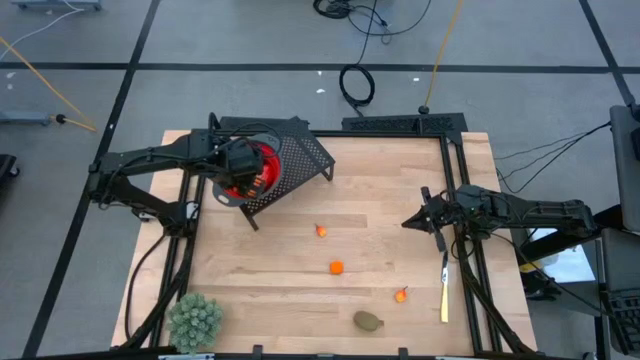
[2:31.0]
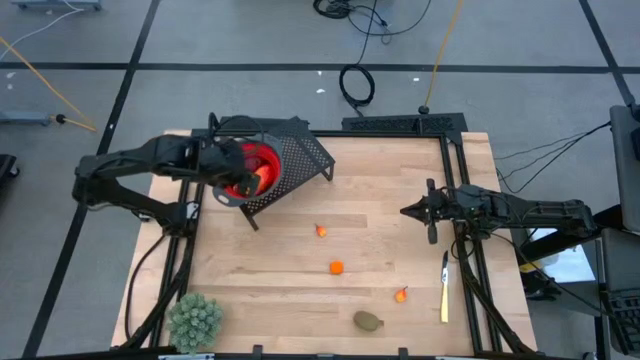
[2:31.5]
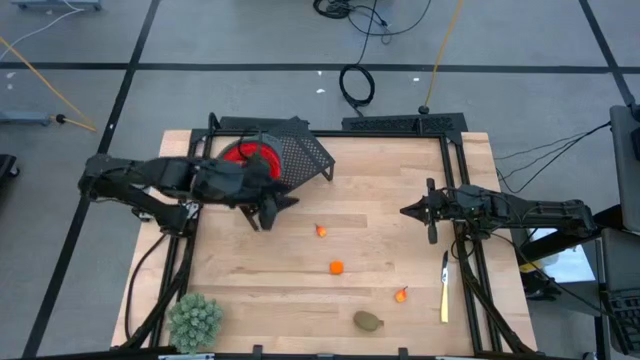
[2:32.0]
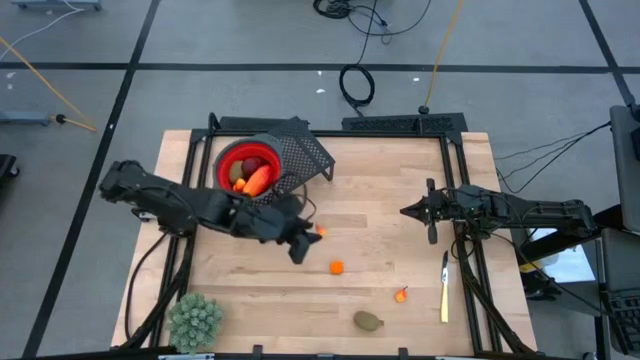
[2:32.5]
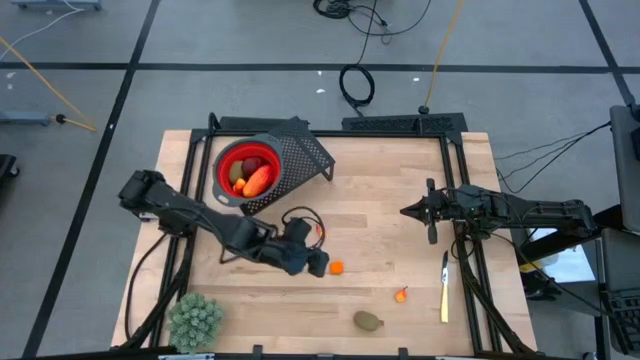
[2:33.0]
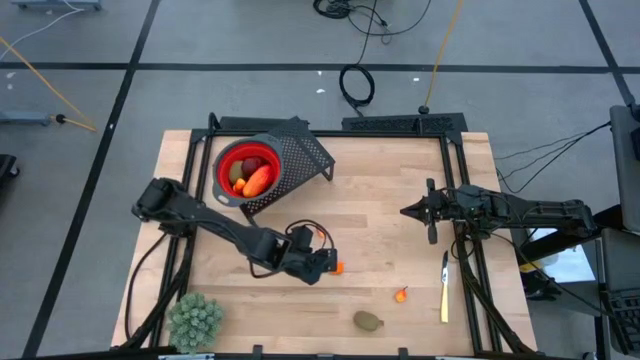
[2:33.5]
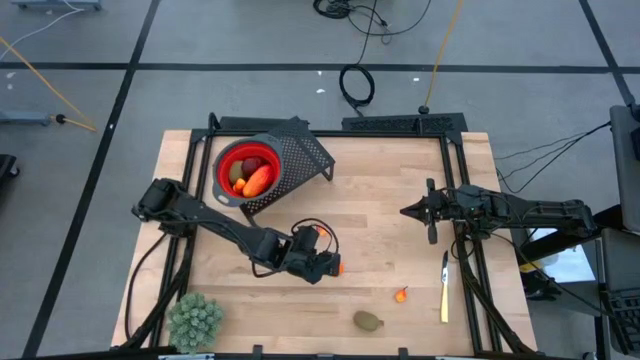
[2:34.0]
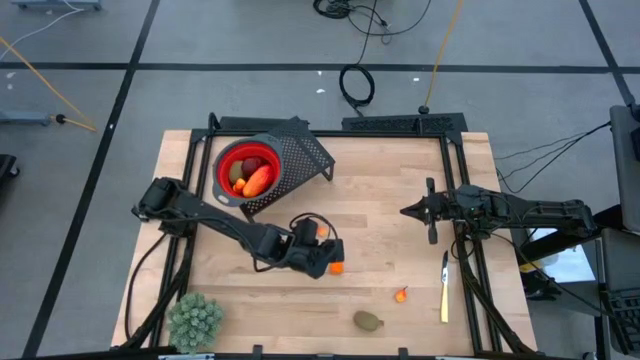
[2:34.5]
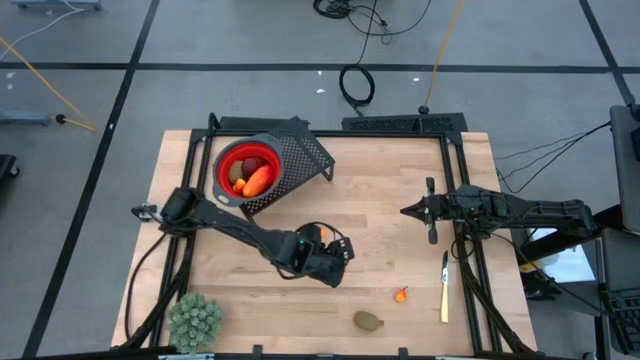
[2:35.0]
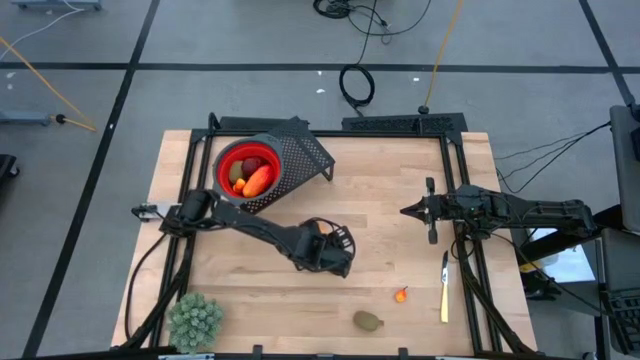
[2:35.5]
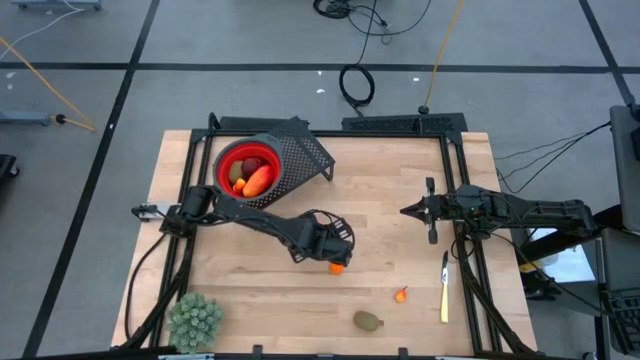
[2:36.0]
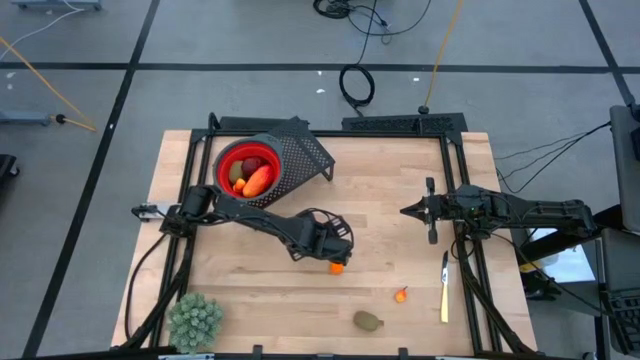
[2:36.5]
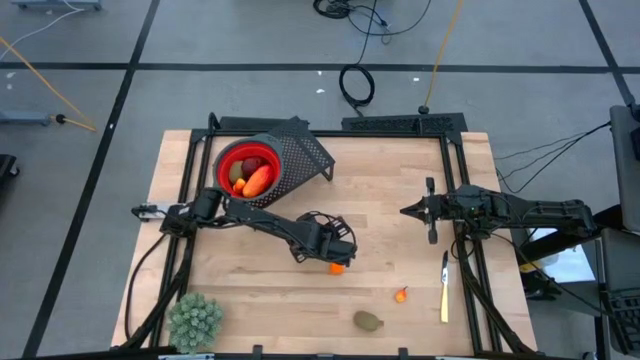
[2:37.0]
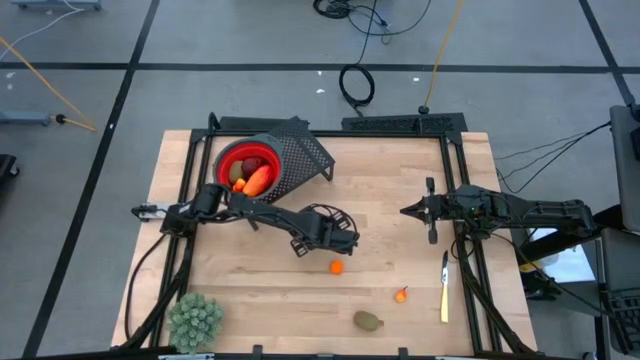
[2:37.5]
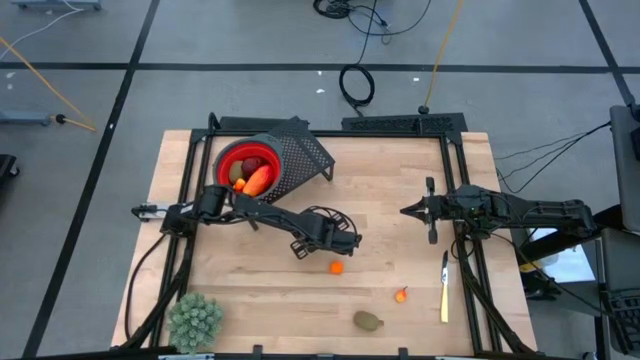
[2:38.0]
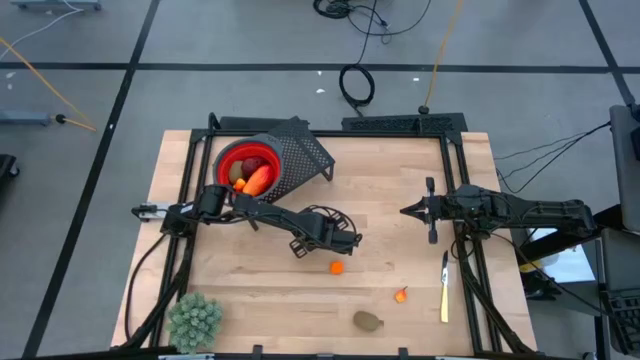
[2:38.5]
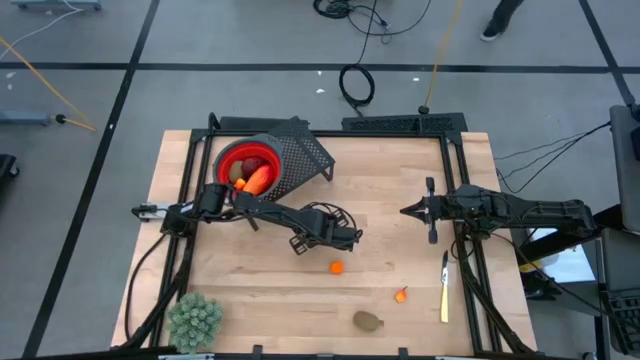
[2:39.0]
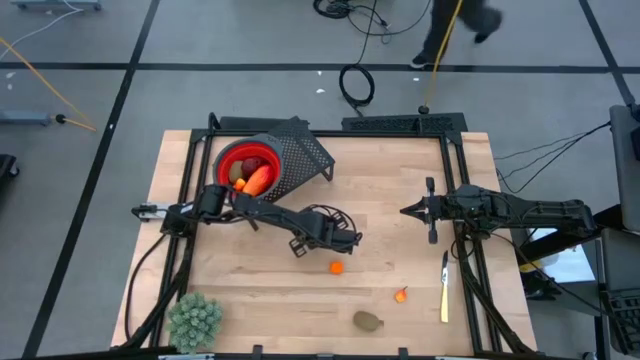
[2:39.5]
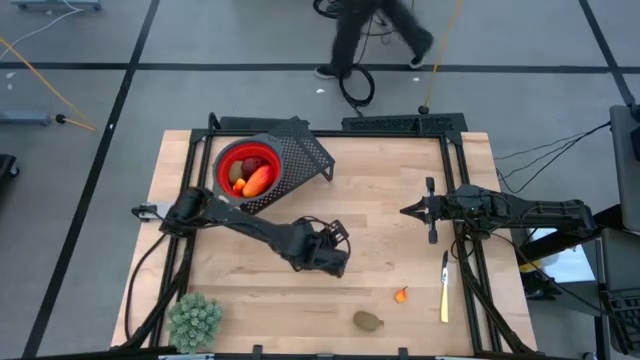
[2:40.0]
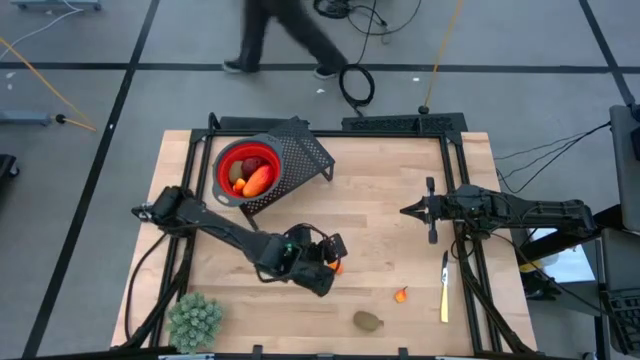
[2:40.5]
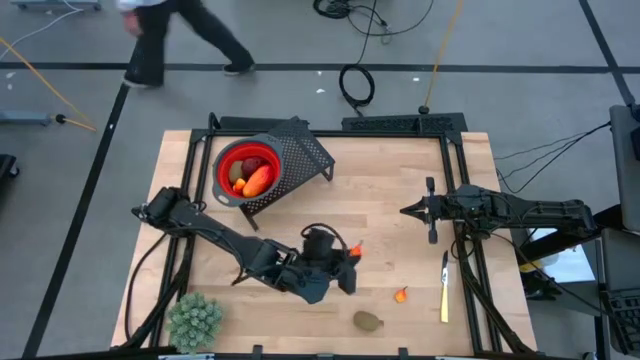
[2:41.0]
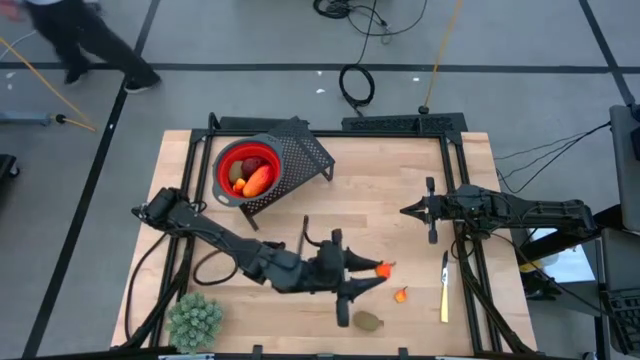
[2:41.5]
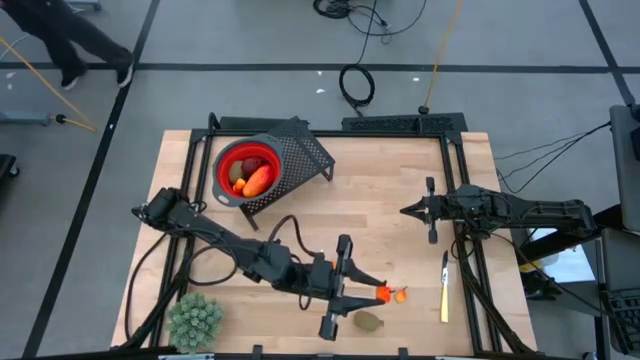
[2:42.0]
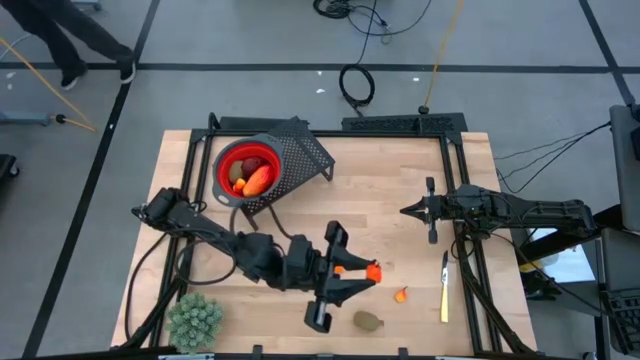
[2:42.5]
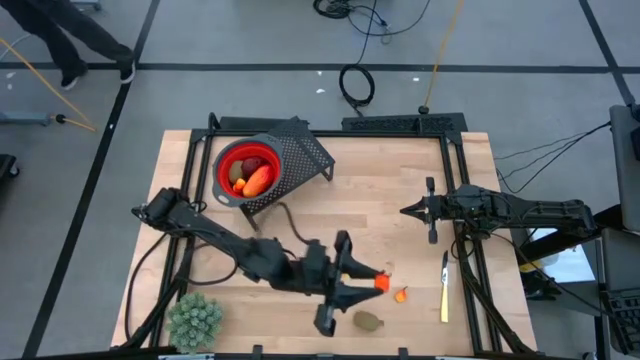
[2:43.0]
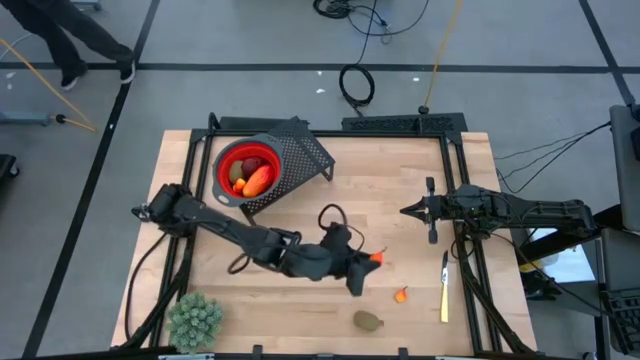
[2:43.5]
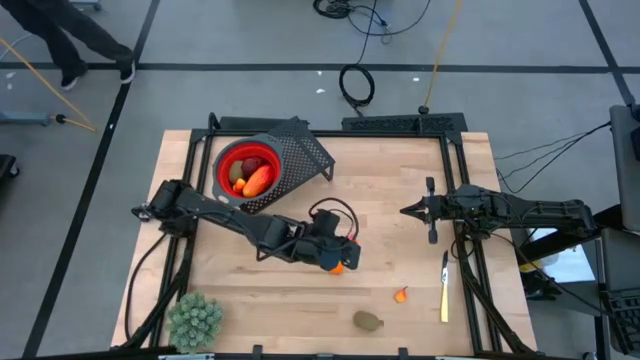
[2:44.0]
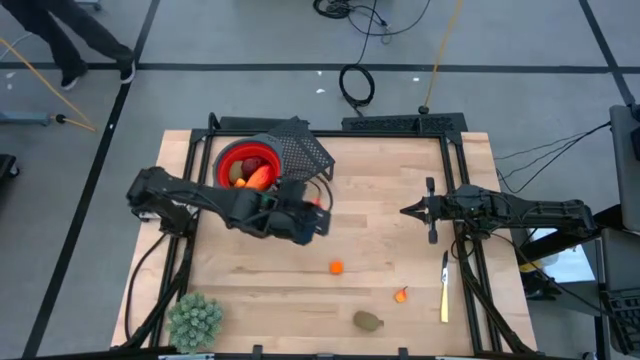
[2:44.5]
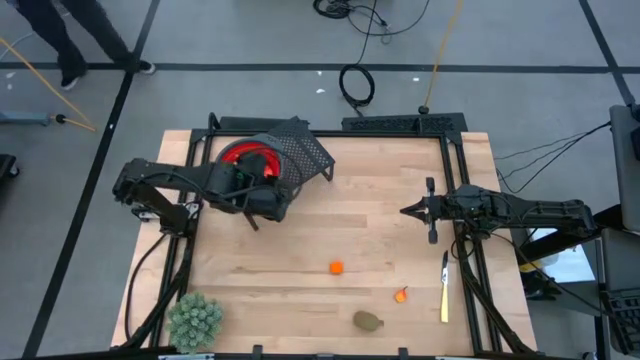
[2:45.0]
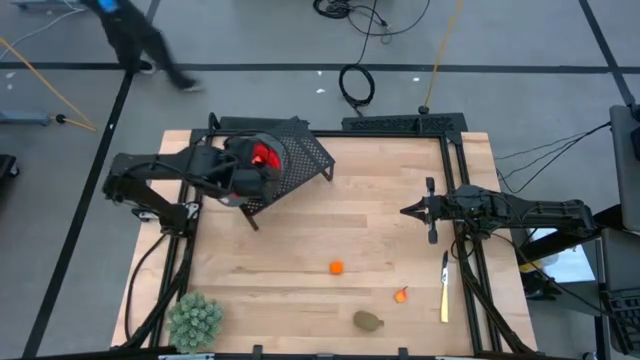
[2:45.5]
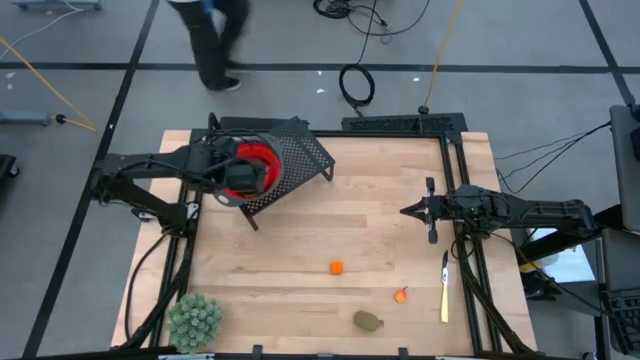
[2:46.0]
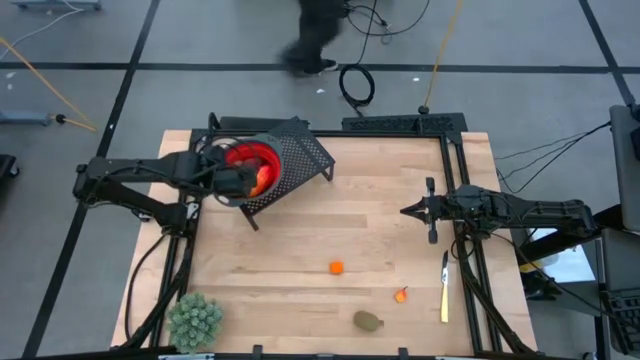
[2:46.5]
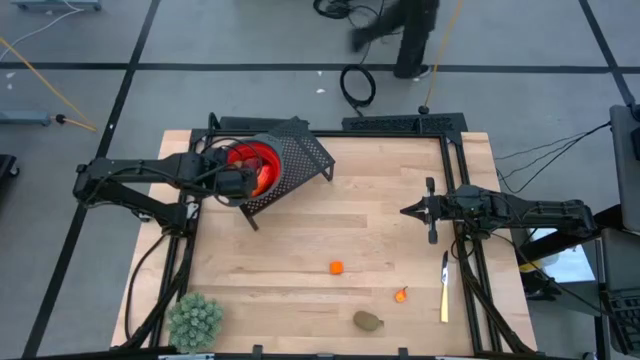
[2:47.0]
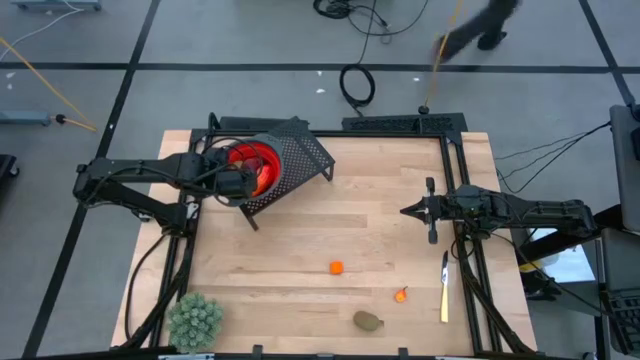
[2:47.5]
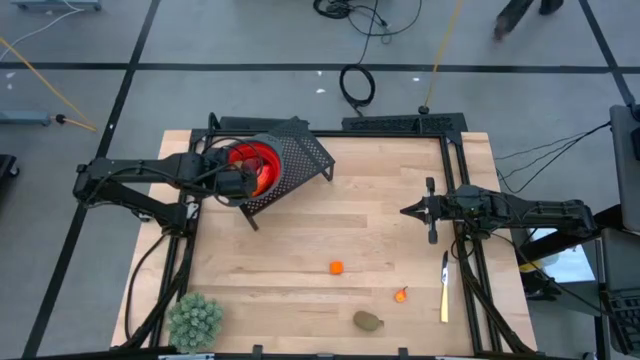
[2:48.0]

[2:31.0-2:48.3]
Task: Pick & Place Fruit
Put the peach into the red strainer bowl on the shelf

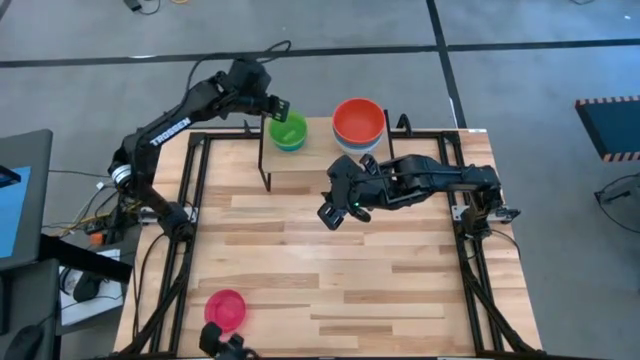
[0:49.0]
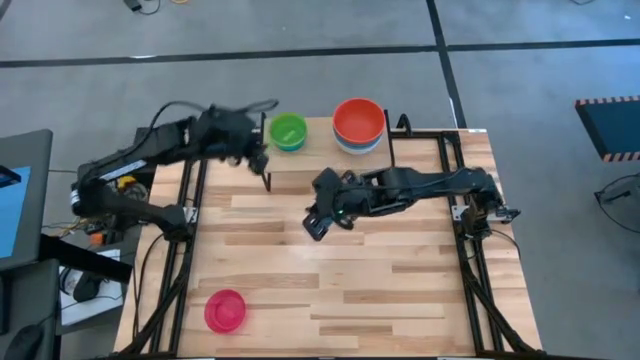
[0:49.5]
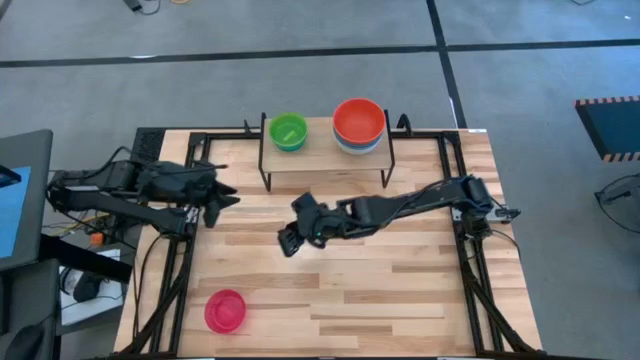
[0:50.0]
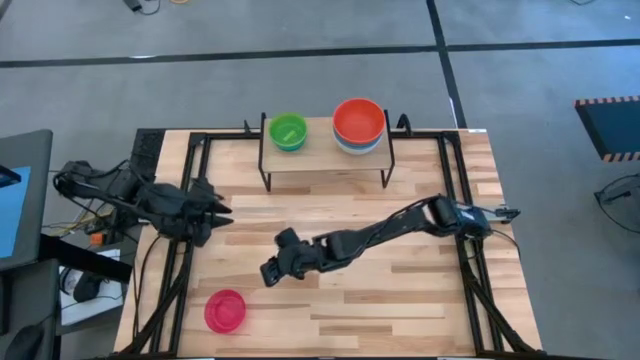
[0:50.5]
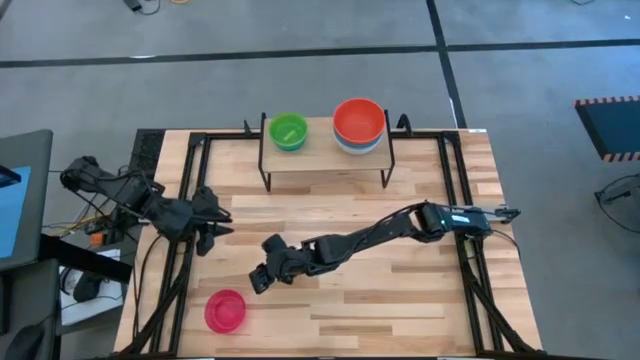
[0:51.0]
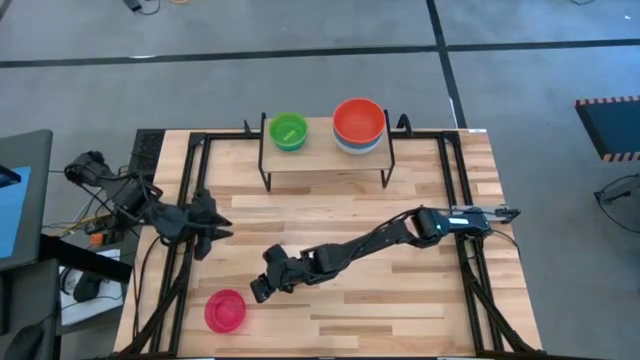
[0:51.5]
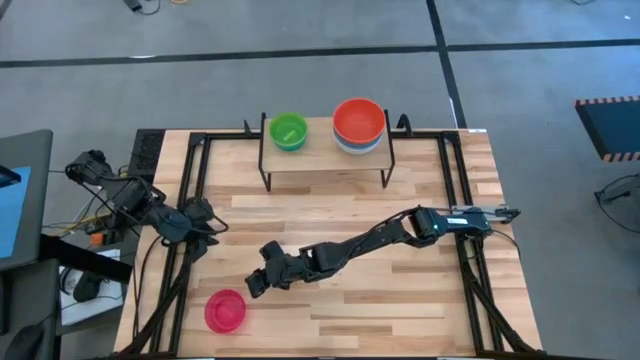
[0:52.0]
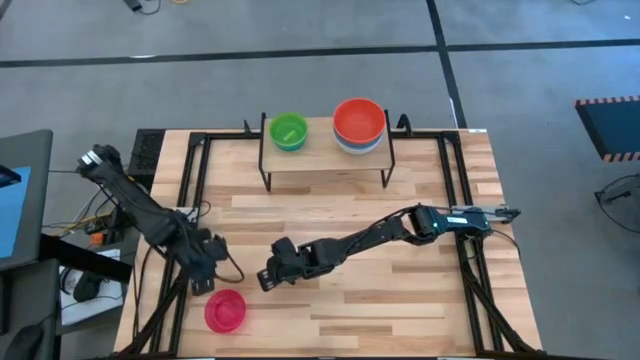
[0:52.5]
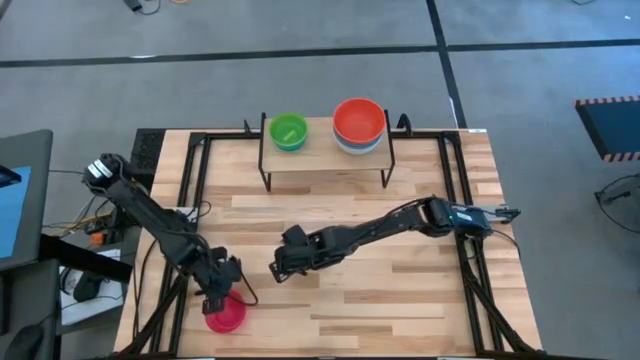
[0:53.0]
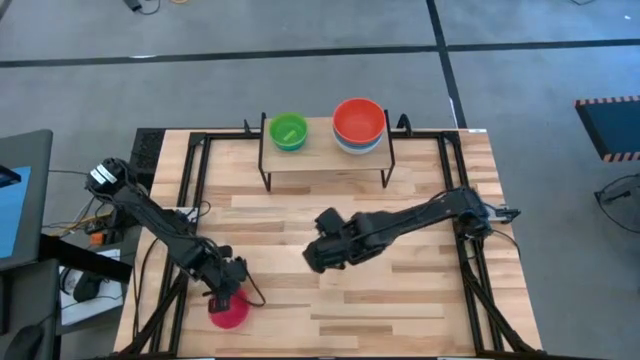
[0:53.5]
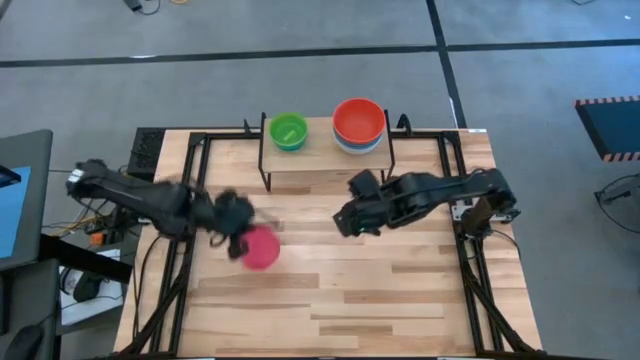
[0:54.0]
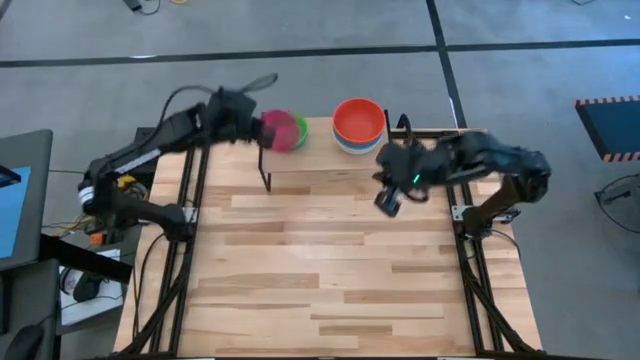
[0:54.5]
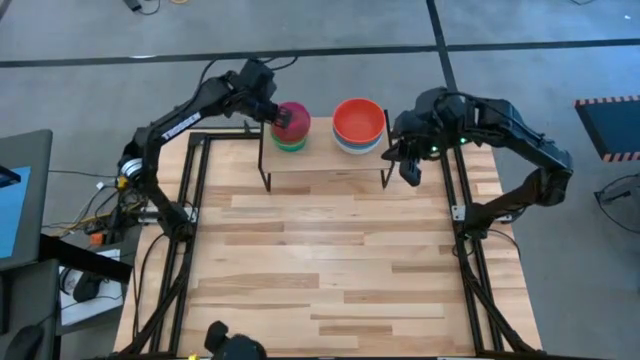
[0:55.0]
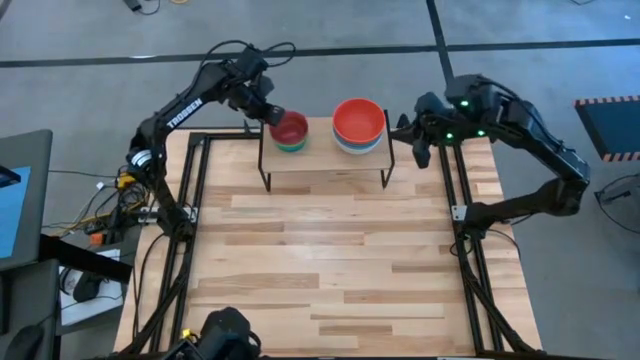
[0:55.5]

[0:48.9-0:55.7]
Task: Place and stack bowls onto a shelf
Stack the small red bowl on top of the small green bowl on the shelf
